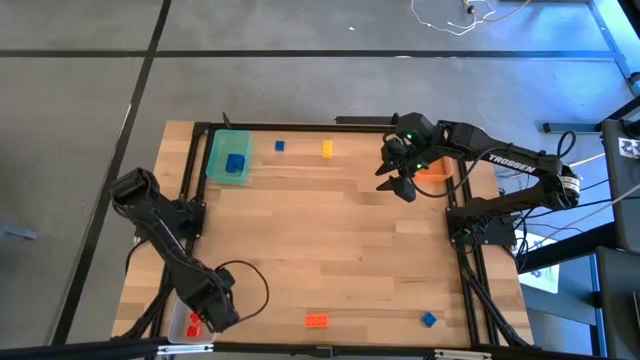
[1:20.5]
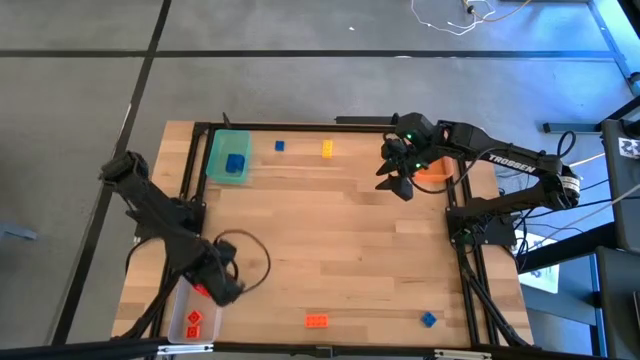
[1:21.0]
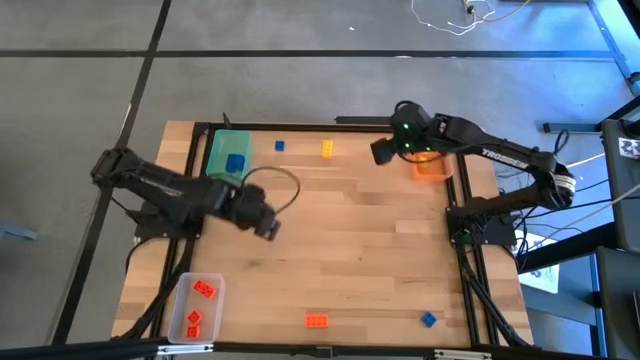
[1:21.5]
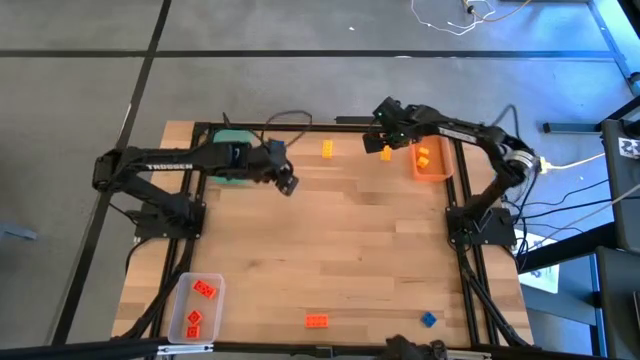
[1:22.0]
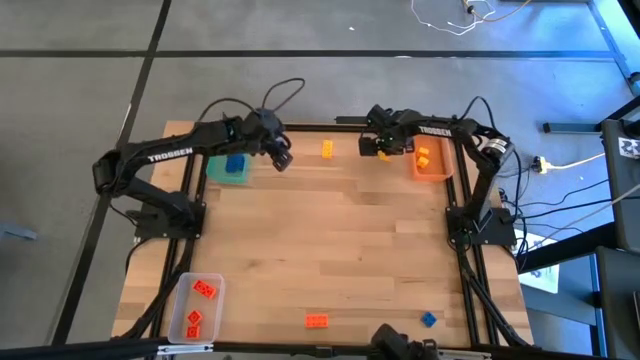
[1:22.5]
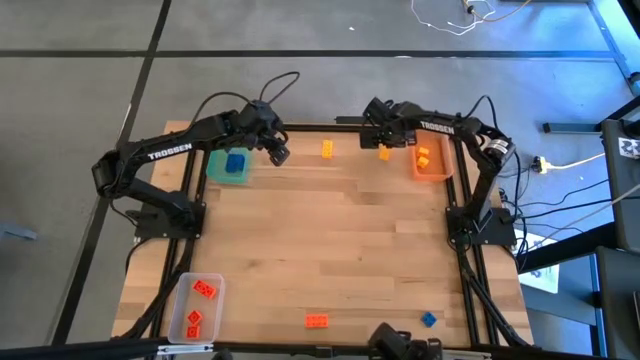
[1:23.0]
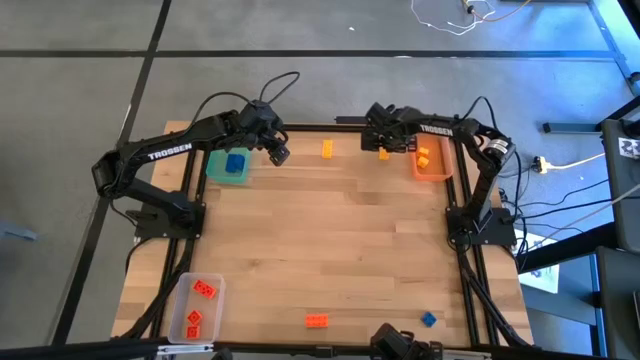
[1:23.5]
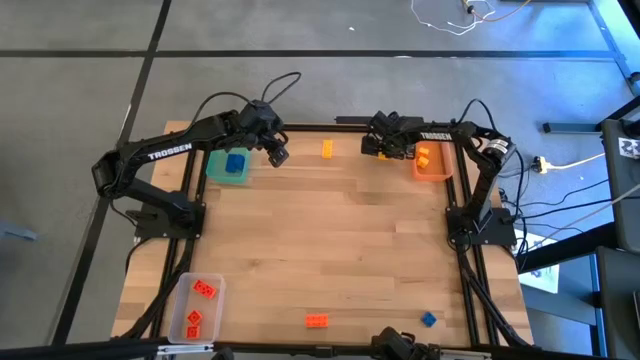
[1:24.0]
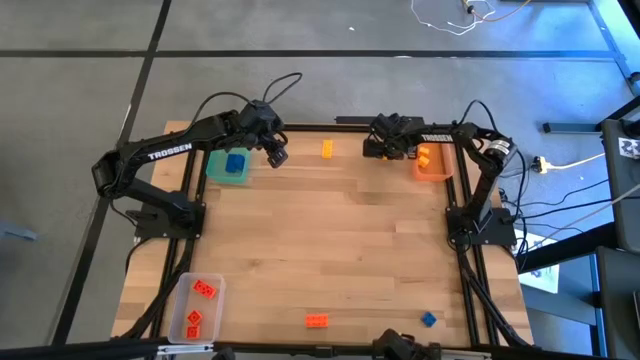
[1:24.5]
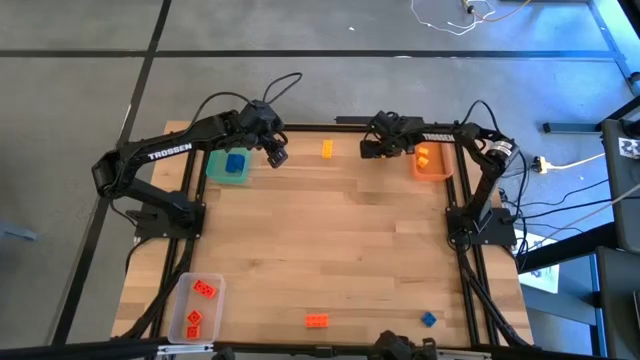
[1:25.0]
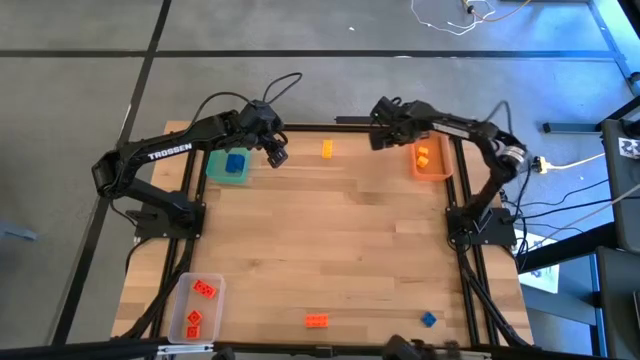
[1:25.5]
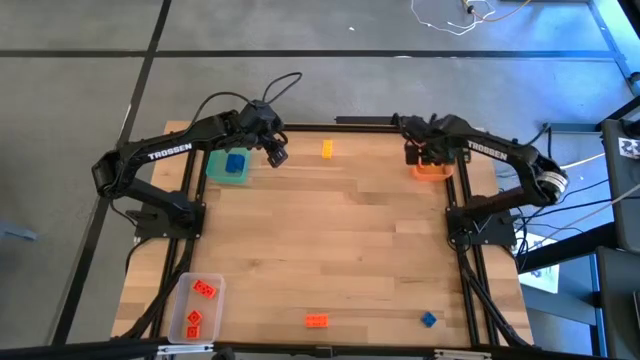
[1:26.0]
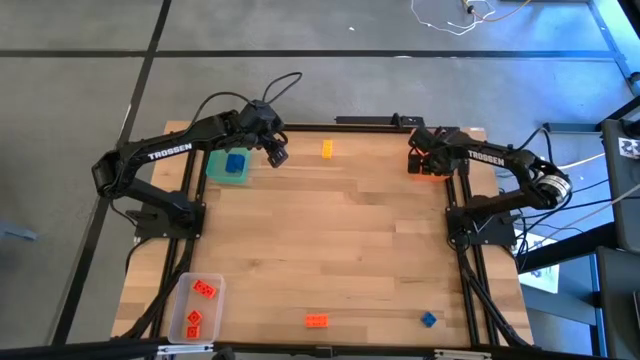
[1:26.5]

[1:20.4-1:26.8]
Task: Sort & place blocks by color
Put the yellow game piece into the orange bin

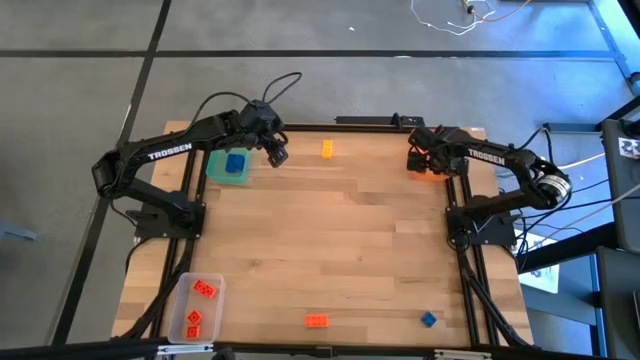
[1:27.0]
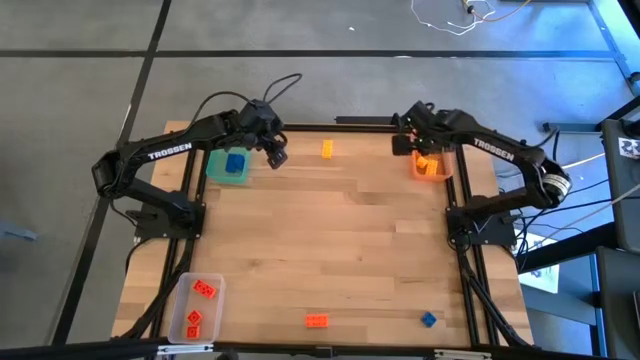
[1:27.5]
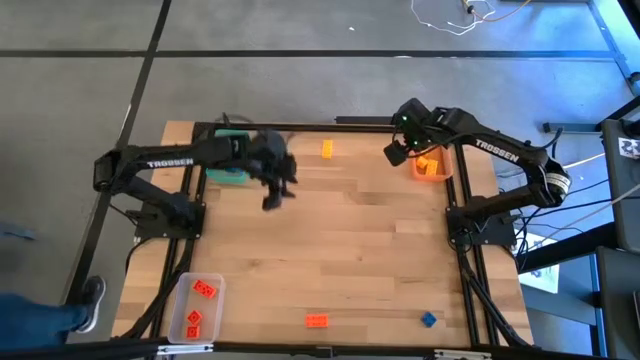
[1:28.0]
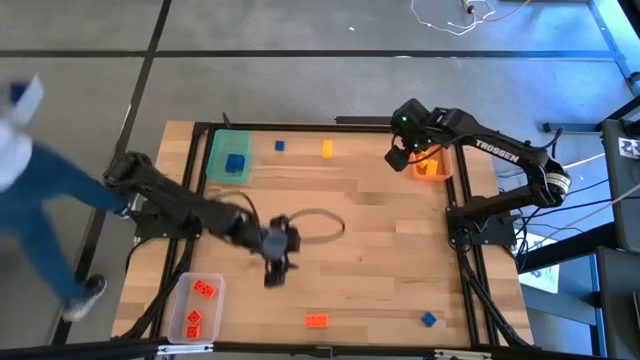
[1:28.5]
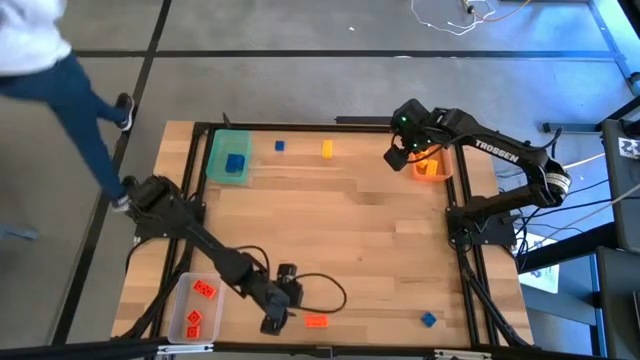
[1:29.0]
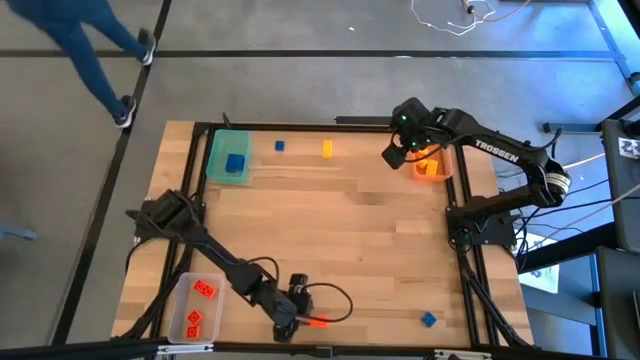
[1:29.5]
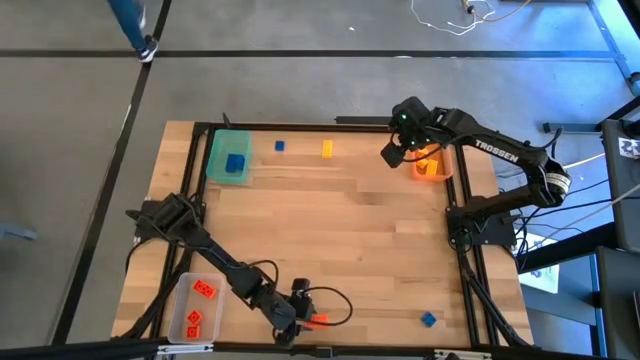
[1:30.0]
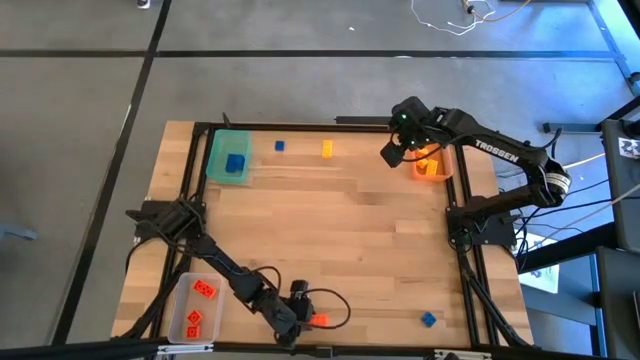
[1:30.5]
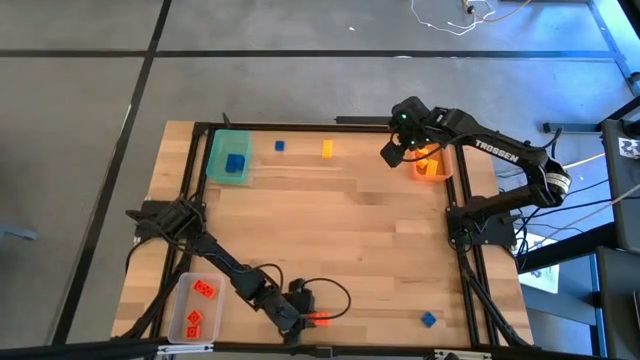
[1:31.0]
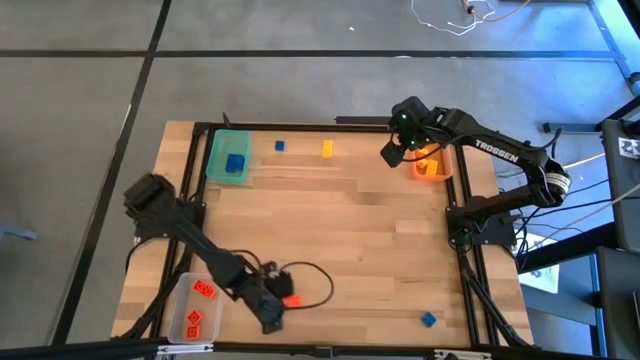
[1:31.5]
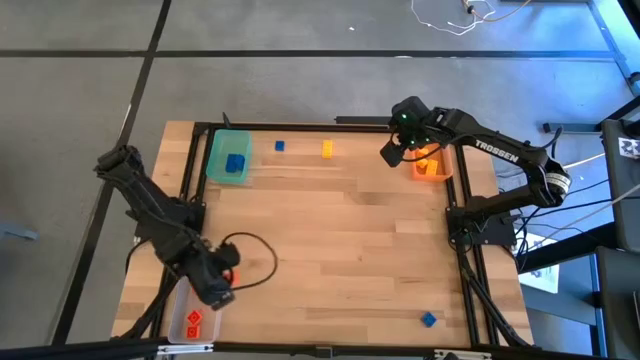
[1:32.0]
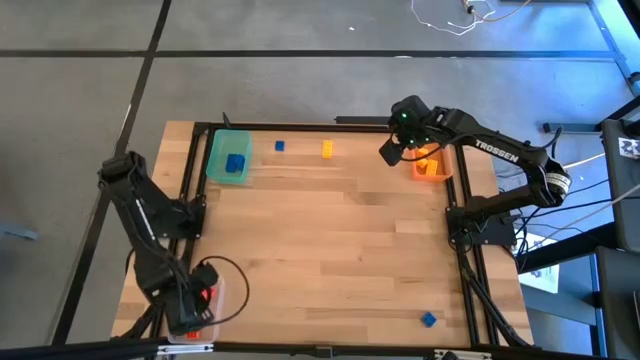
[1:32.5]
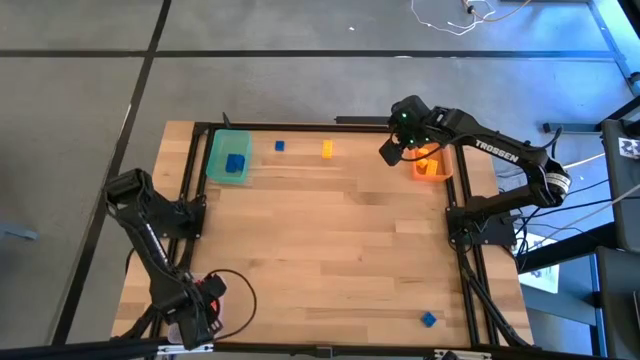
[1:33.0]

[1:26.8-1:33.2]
Put the orange game piece into the transparent bin

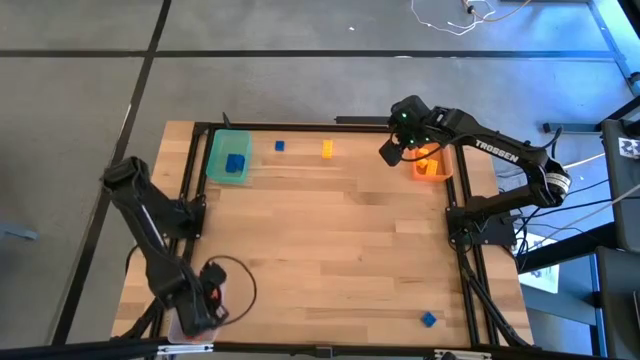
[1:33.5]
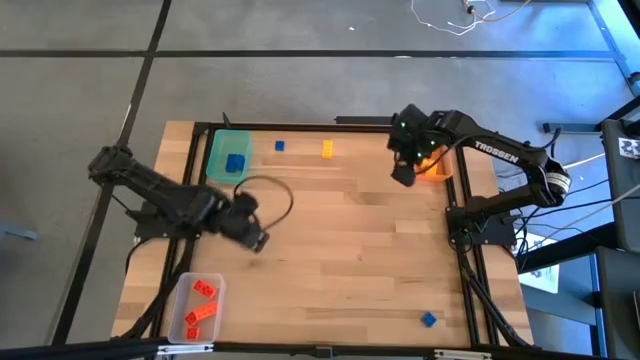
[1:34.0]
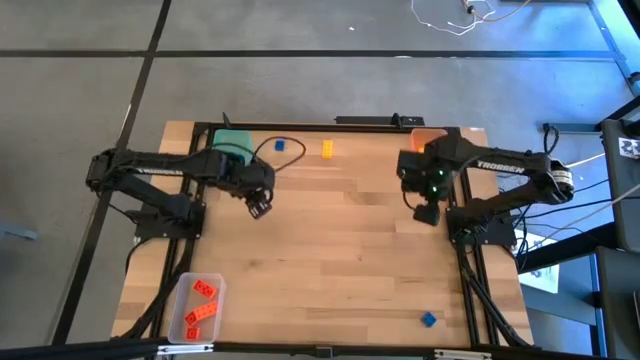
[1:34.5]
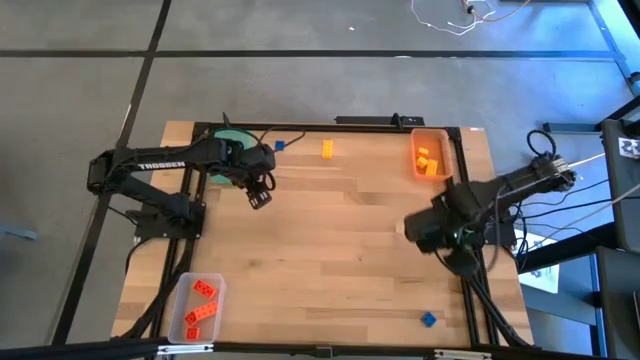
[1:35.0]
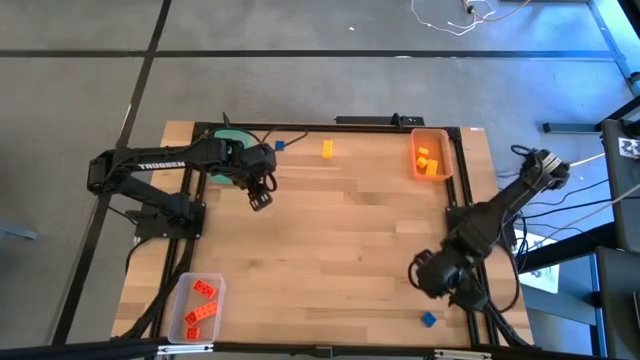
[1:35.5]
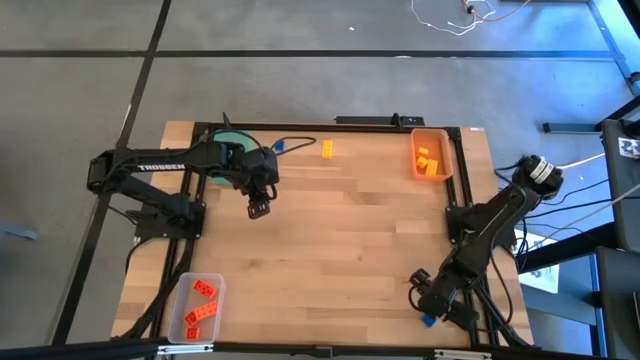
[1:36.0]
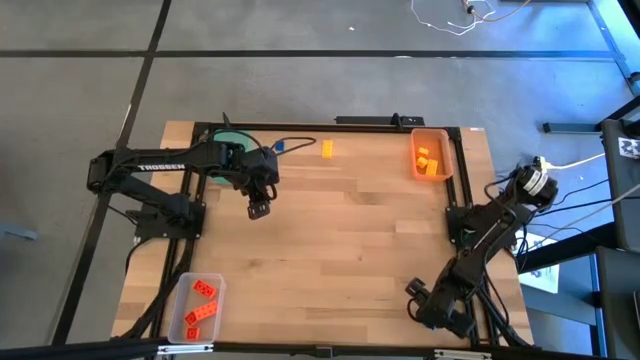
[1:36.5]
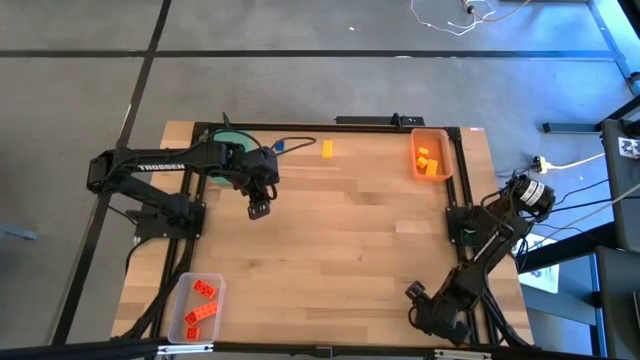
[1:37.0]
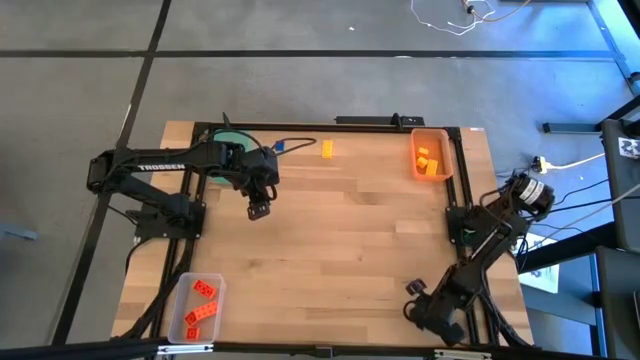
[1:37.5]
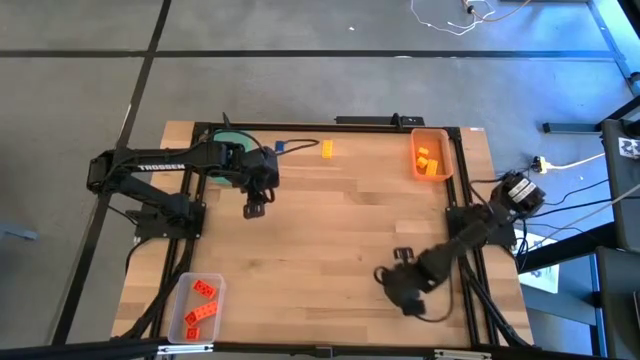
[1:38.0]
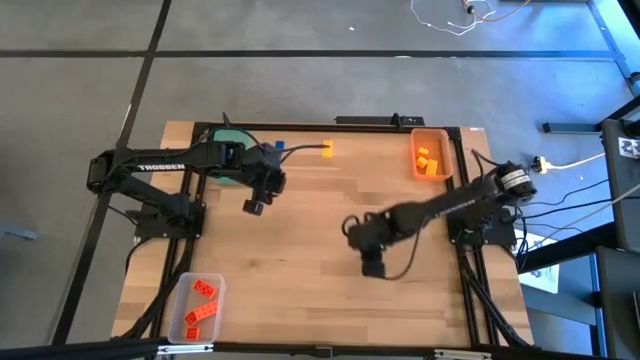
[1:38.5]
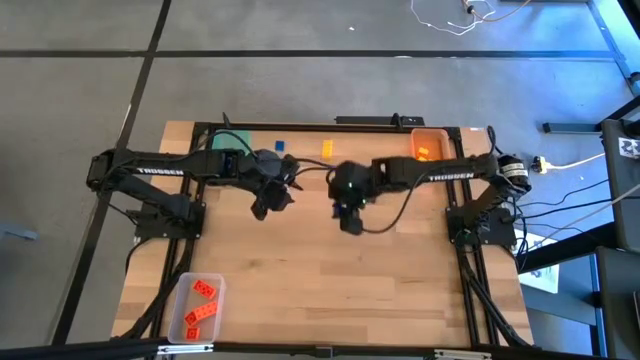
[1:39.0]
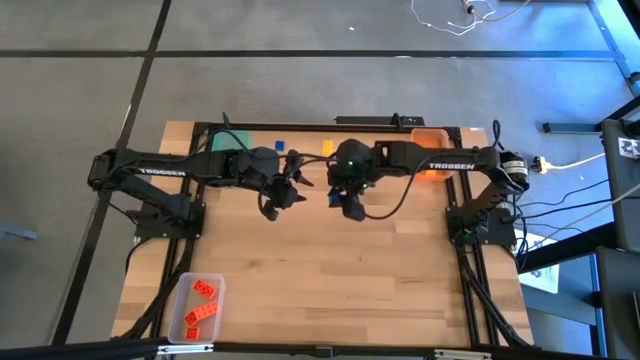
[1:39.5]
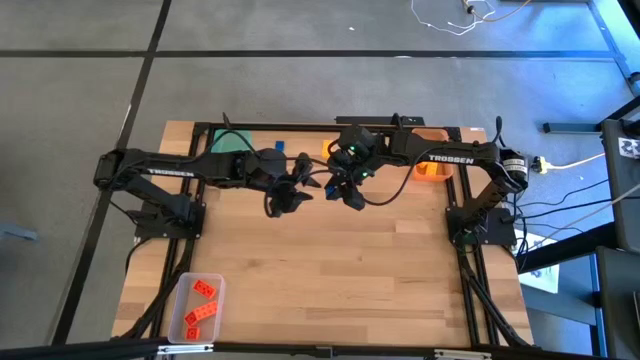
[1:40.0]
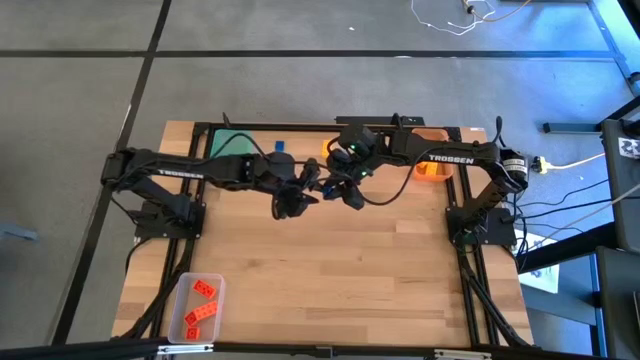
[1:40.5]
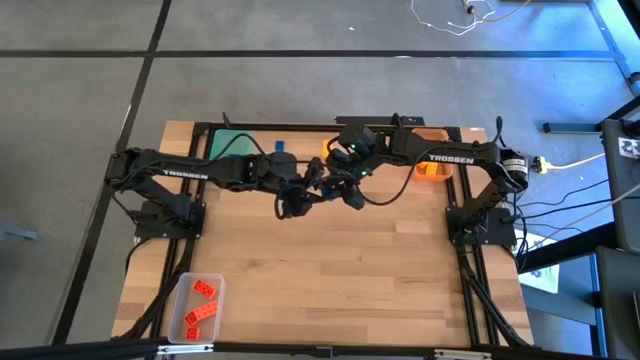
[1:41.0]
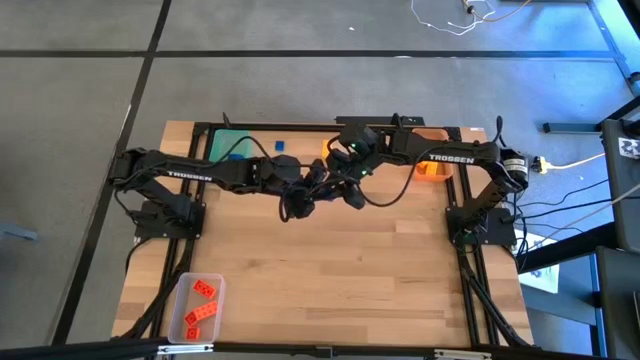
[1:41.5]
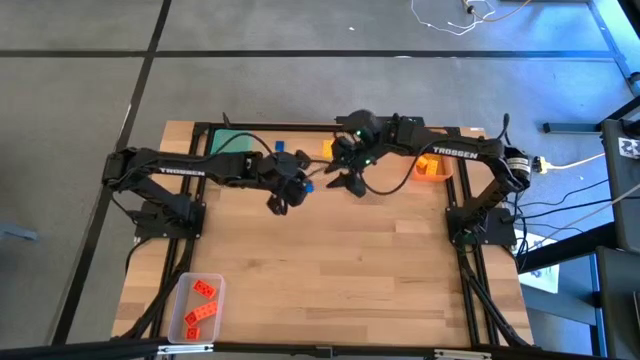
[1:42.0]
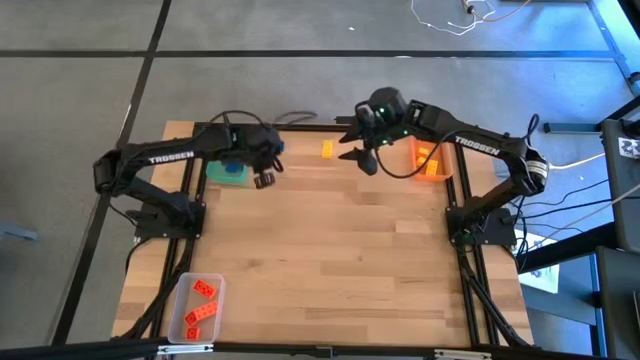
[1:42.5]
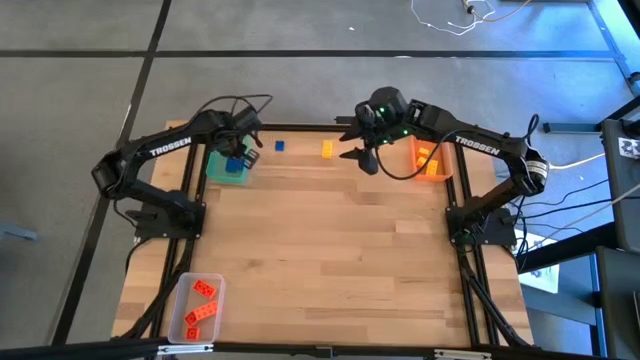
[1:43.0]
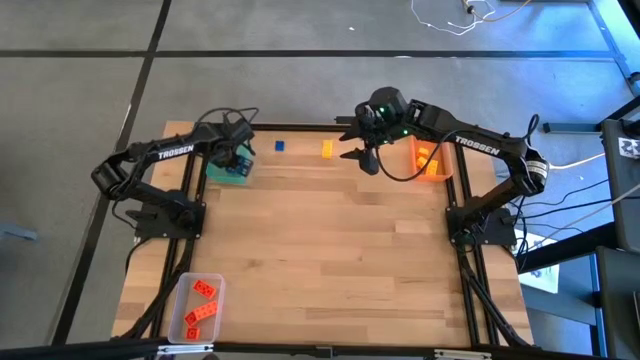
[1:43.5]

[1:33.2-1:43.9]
Put the blue game piece into the blue bin
